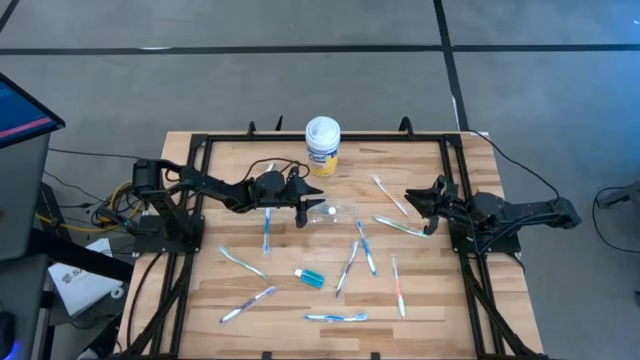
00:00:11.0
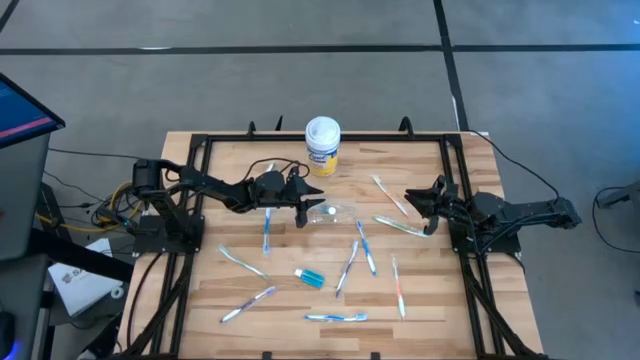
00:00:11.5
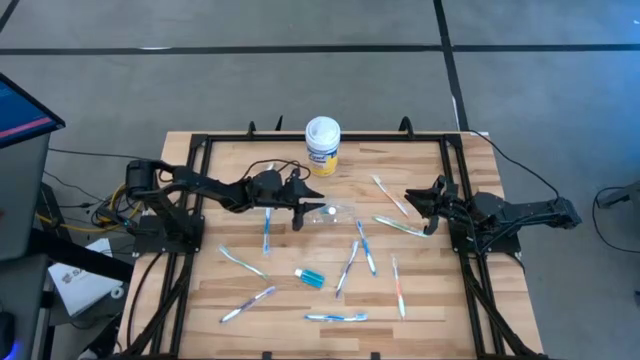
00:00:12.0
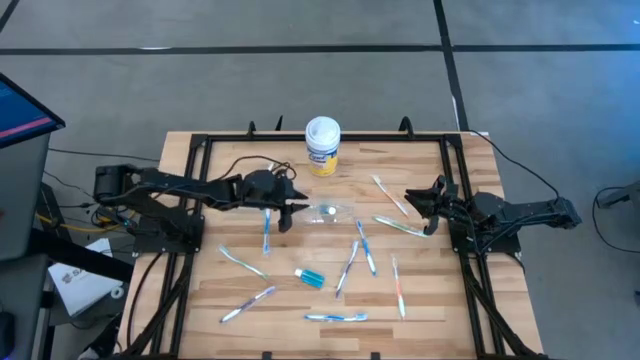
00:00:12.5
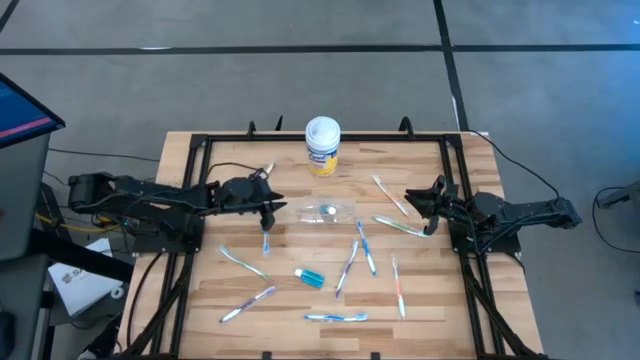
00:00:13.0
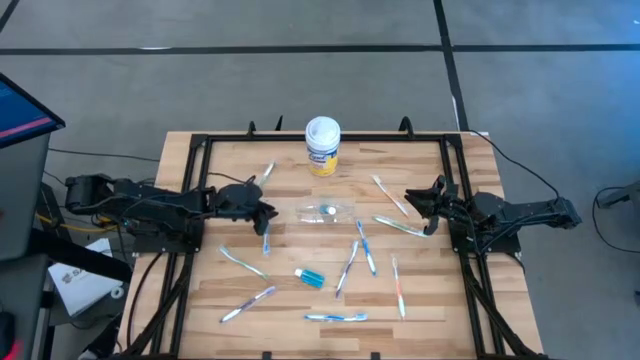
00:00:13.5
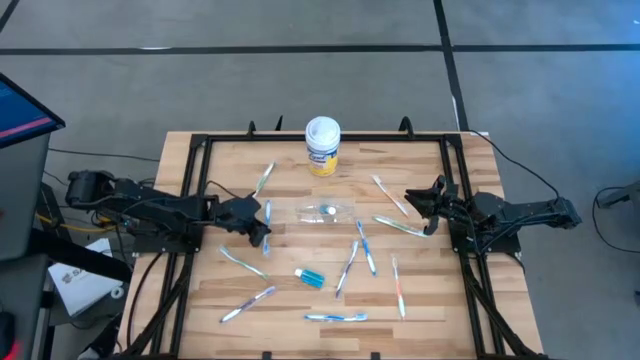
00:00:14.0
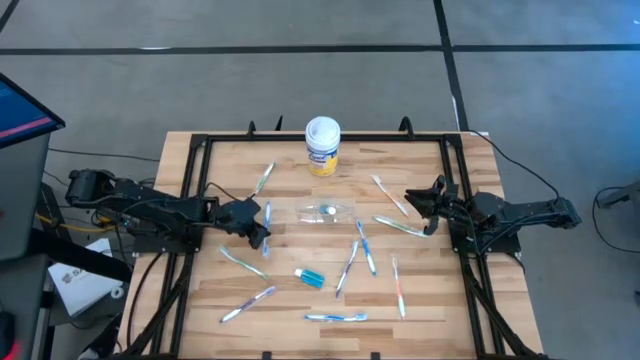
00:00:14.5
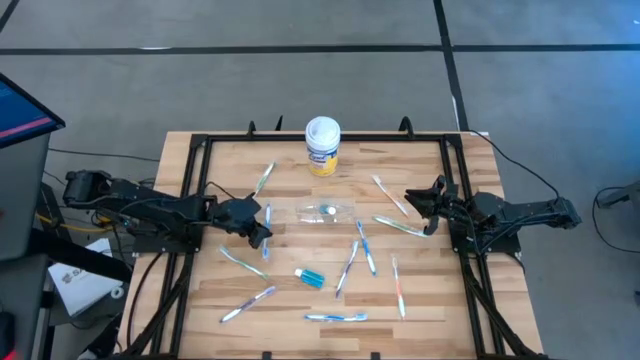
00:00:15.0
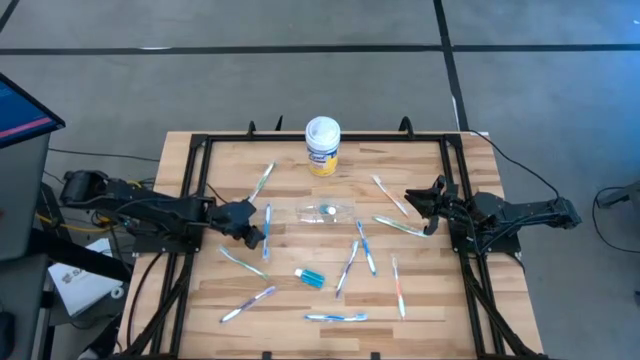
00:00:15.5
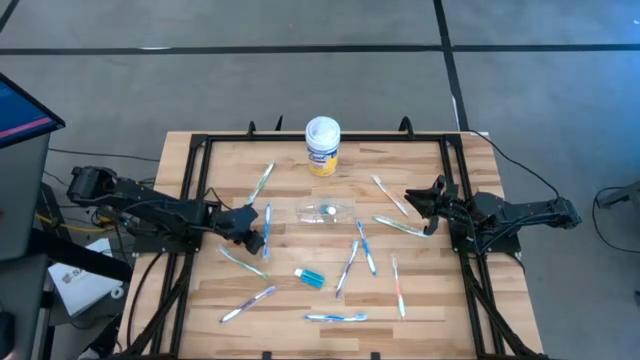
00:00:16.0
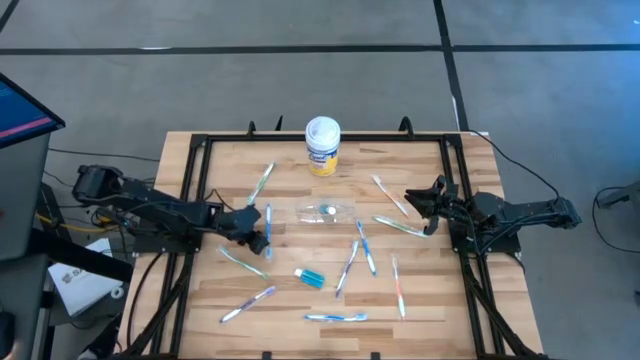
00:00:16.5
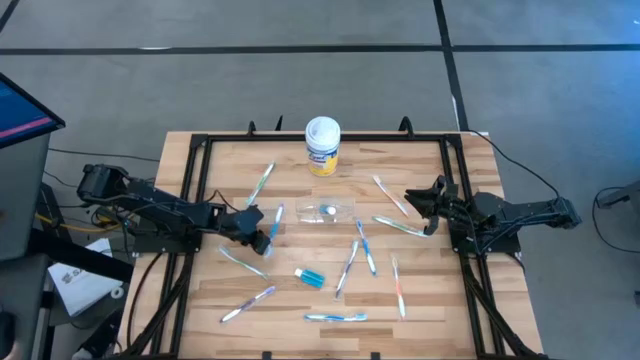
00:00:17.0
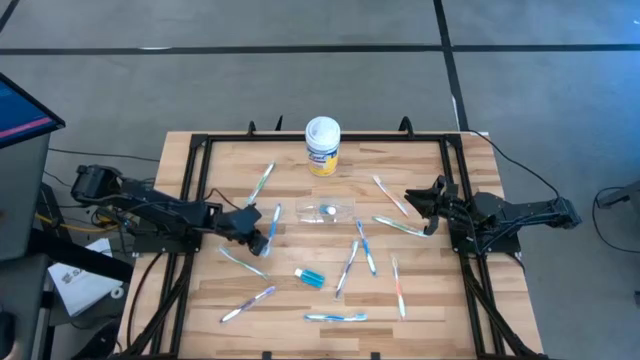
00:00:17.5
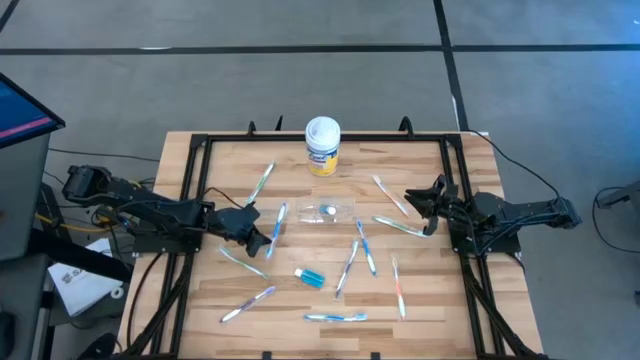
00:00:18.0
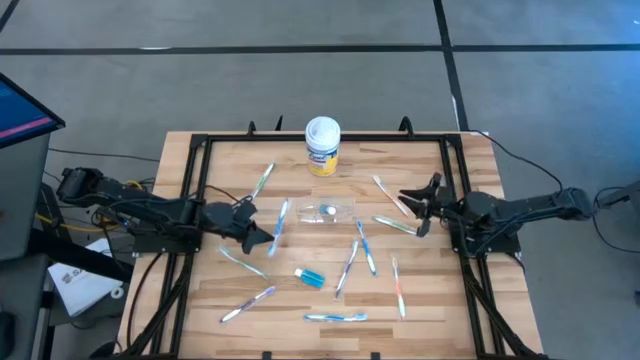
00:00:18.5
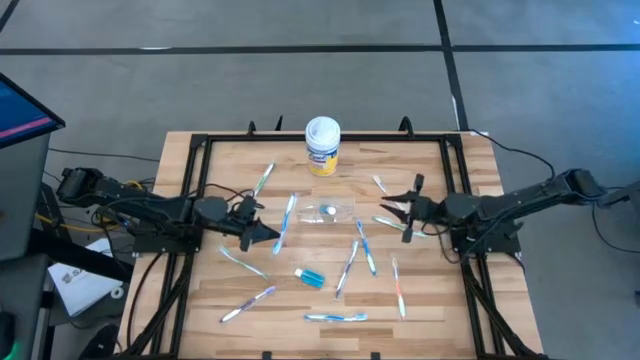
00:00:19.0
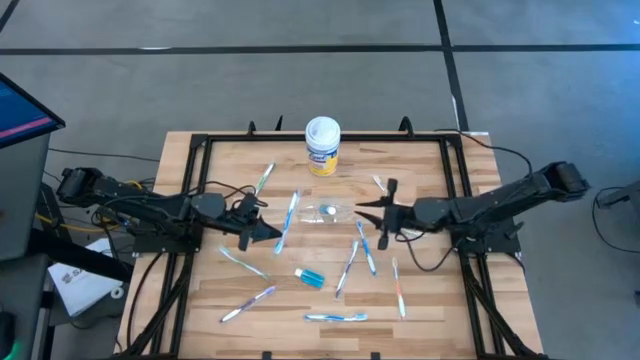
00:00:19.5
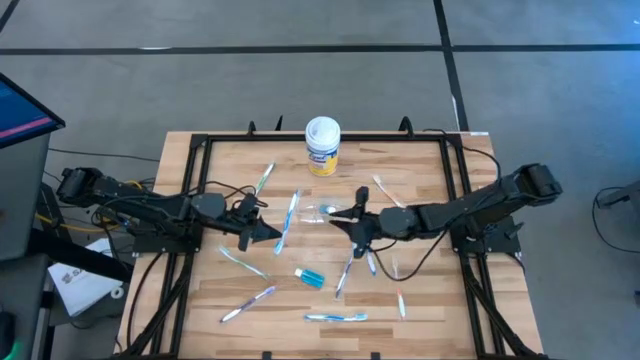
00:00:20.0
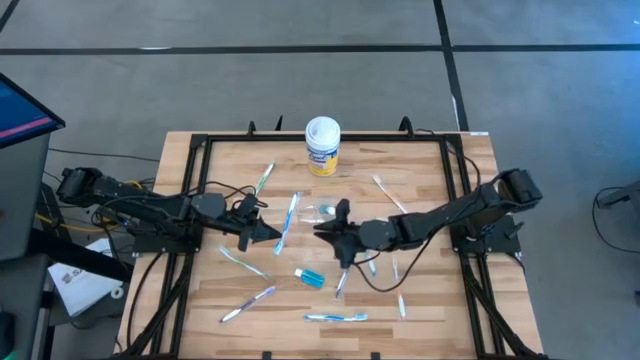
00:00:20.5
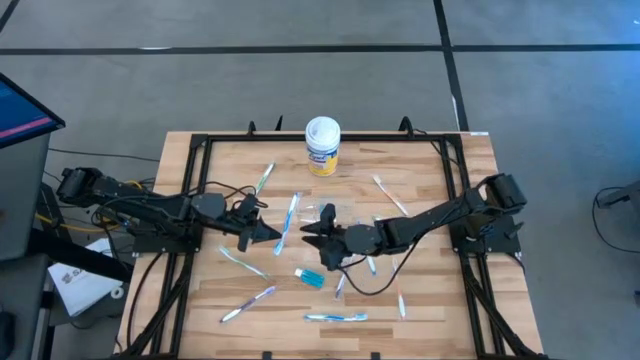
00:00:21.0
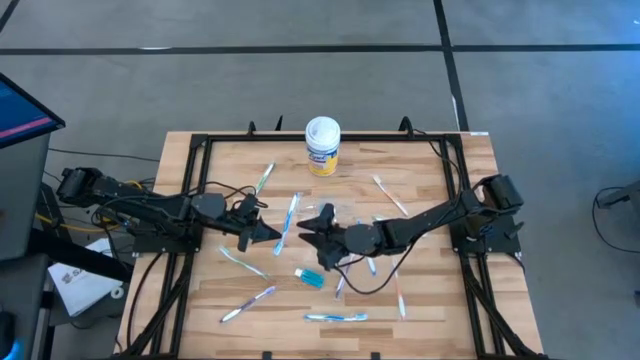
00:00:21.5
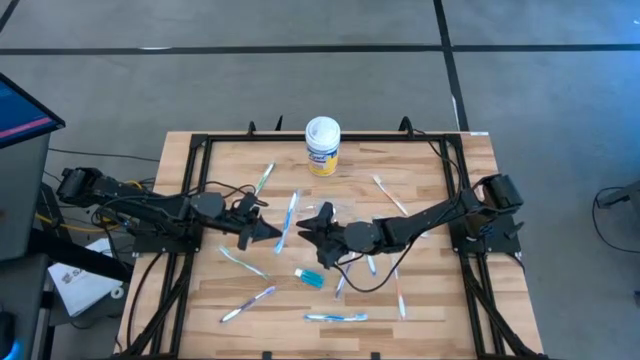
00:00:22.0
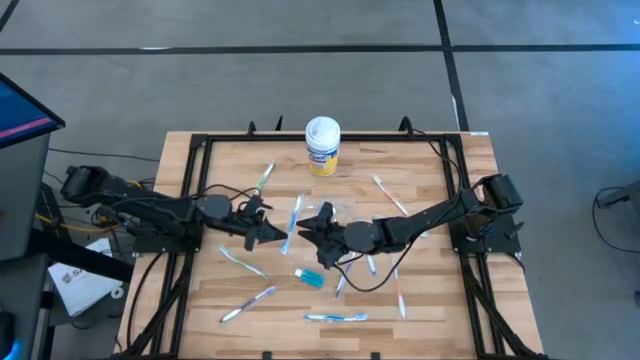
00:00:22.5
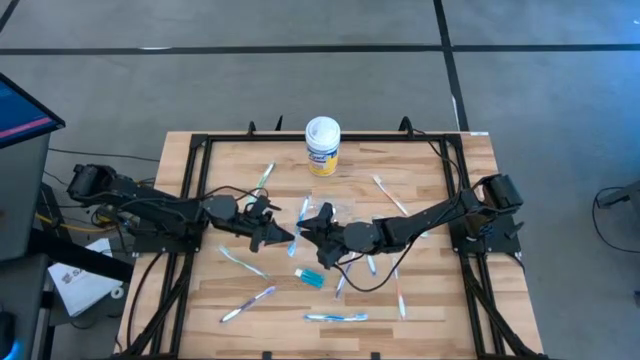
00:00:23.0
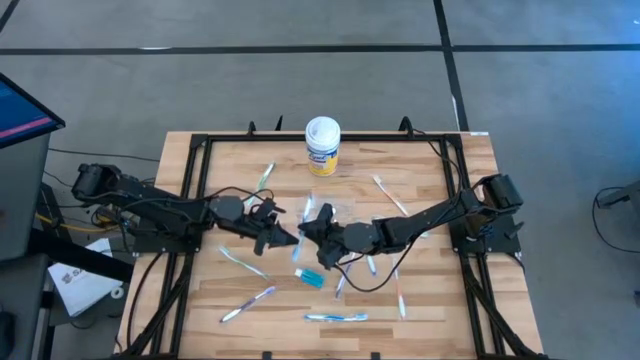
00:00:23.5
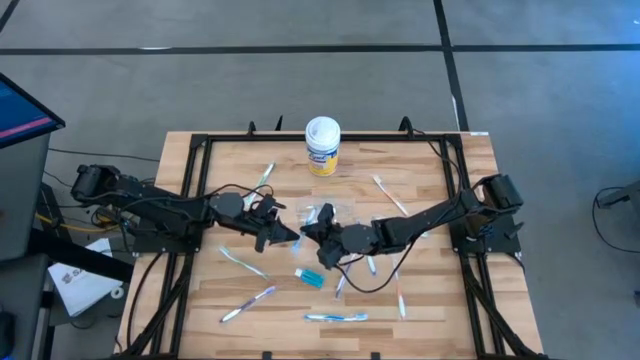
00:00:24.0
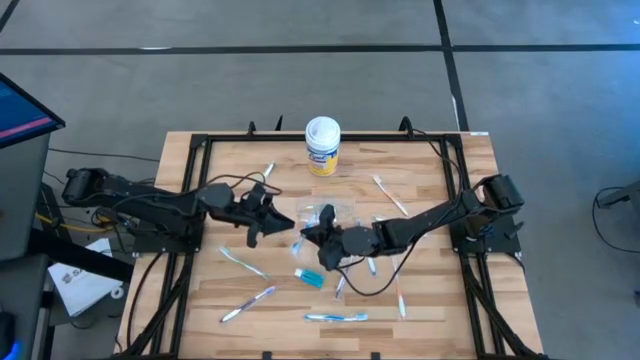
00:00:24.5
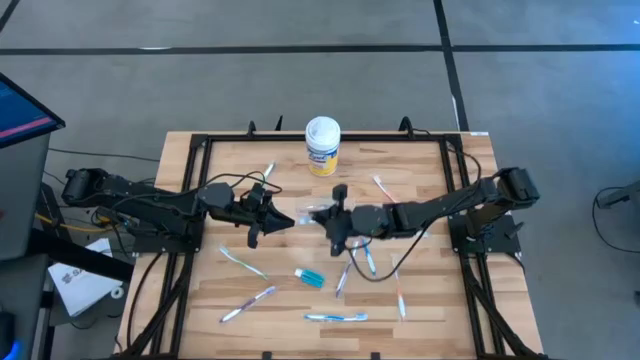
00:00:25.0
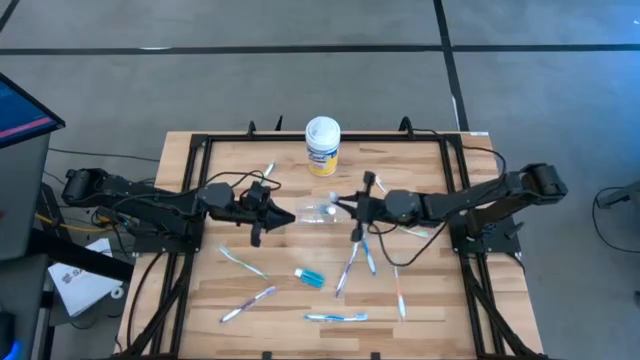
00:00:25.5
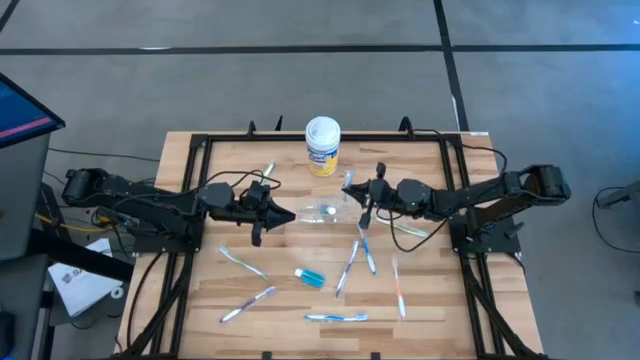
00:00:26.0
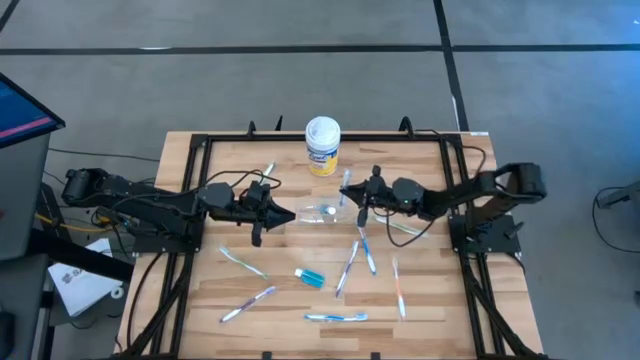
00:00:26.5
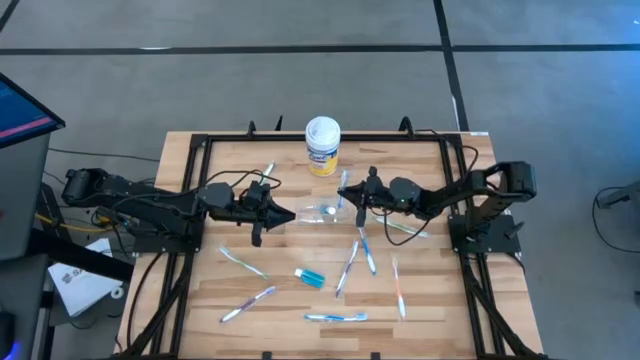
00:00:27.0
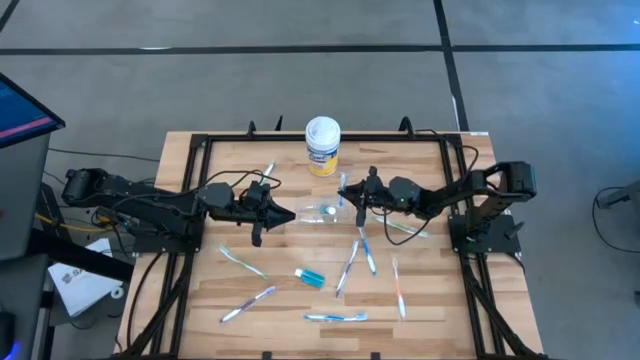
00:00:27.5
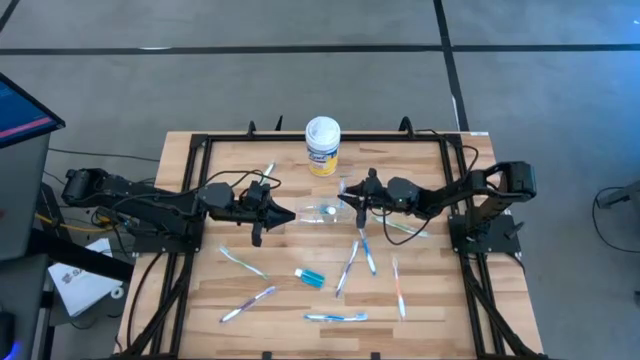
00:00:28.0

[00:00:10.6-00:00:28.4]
Task: Pick & Place toothbrushing station
Put the top left blue toothbrush into the transparent organizer
